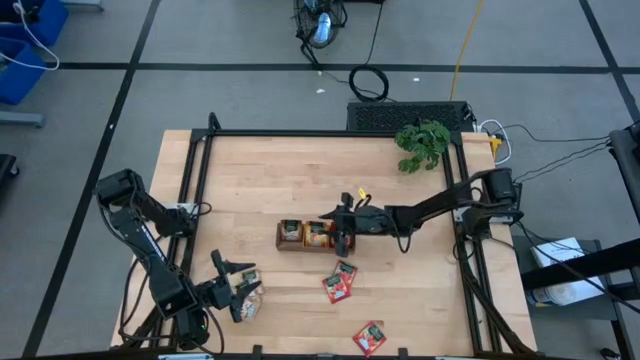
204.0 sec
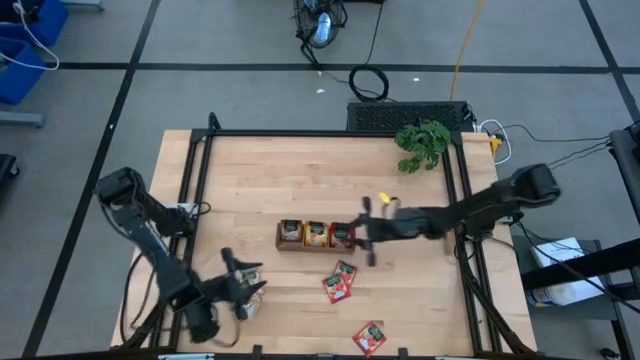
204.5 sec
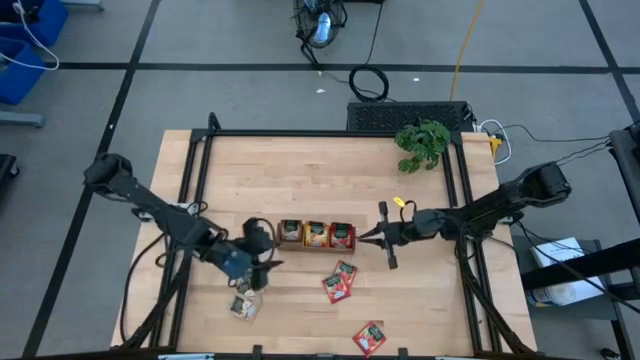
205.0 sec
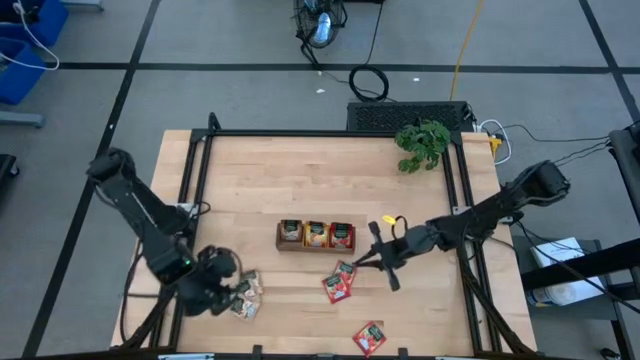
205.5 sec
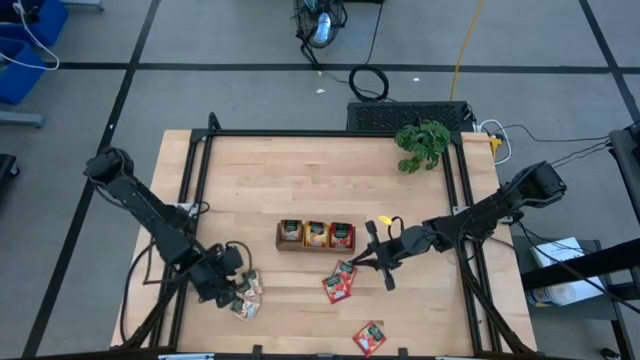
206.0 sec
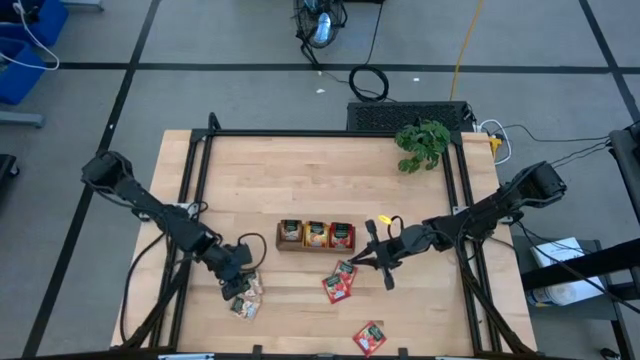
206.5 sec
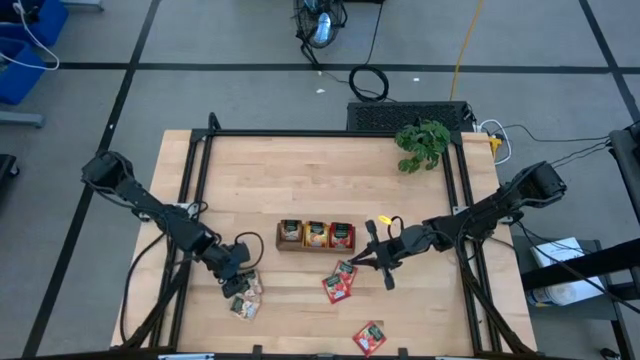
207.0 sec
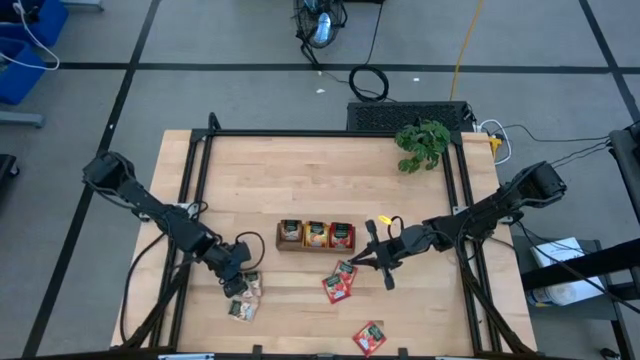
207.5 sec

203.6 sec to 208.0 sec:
Task: Pick & Place Tea
Put the brown tea bag into the left section of the wooden organizer

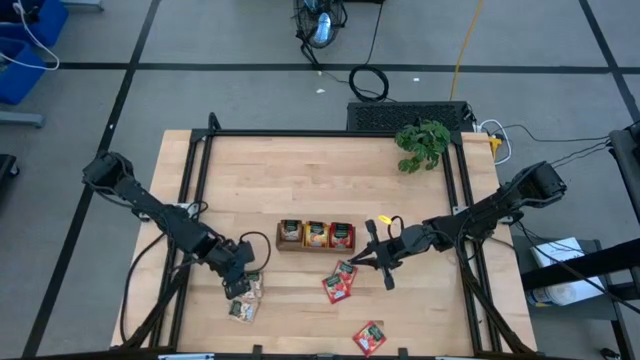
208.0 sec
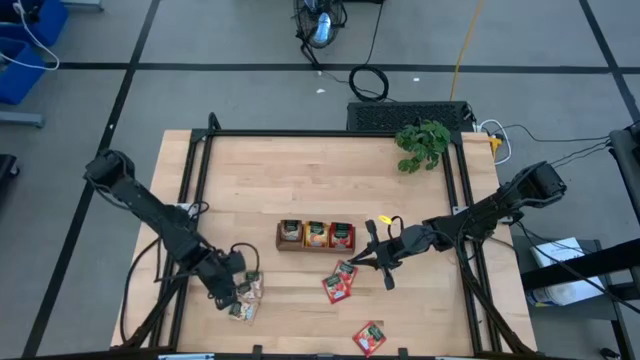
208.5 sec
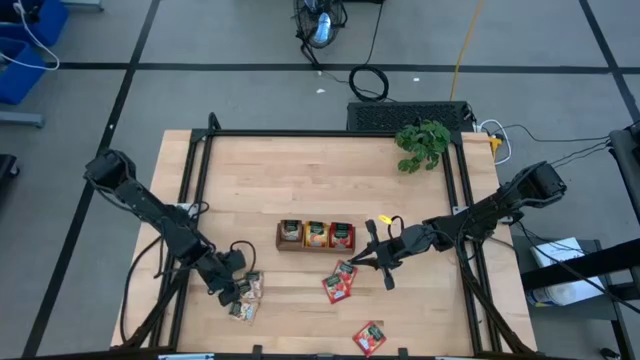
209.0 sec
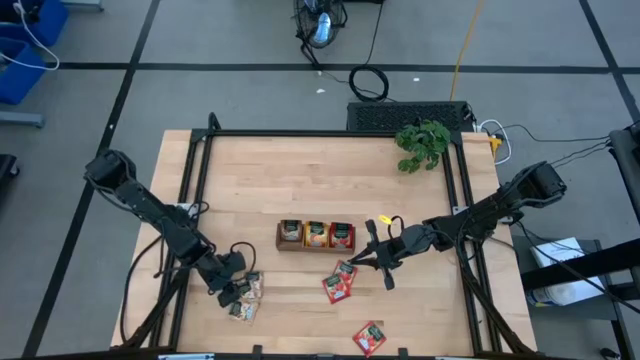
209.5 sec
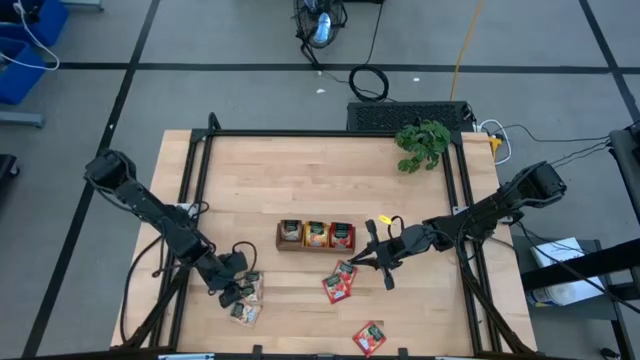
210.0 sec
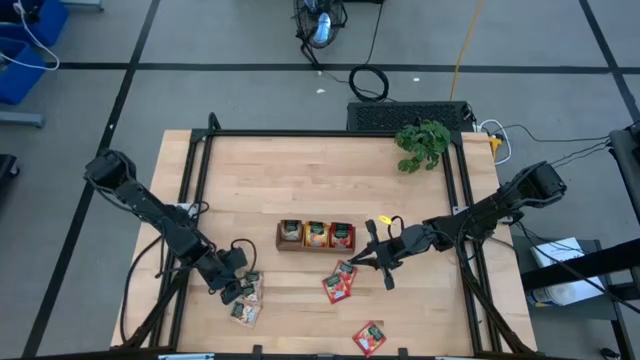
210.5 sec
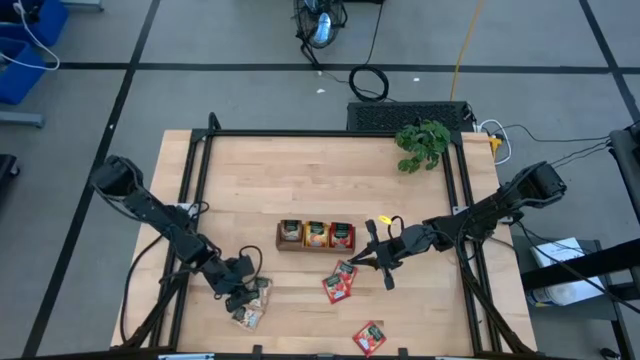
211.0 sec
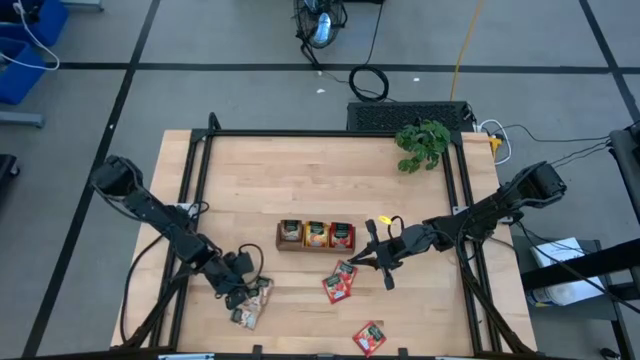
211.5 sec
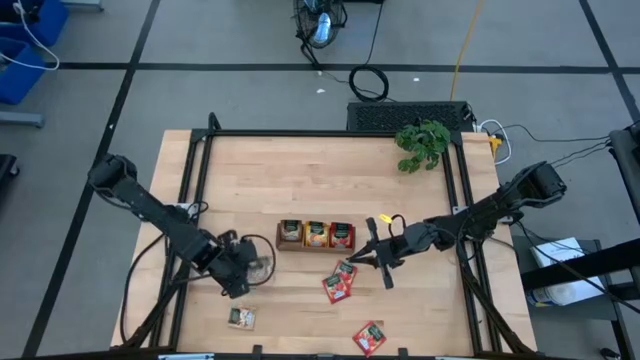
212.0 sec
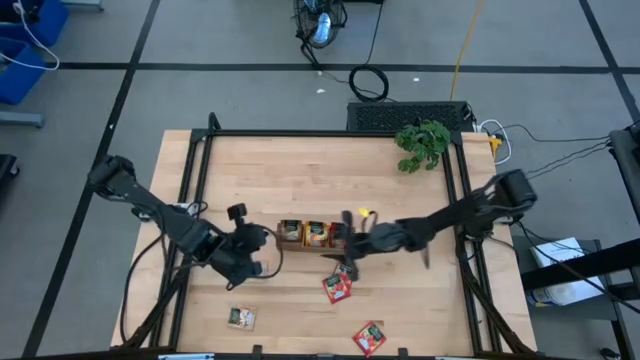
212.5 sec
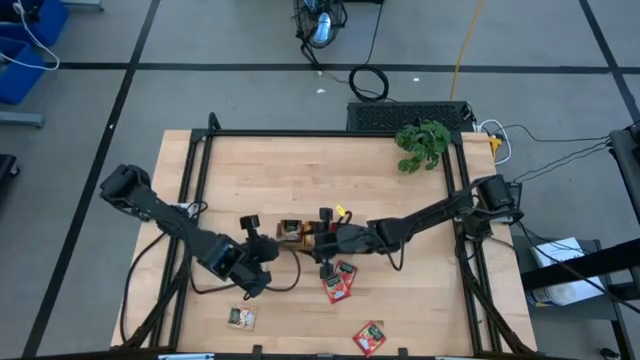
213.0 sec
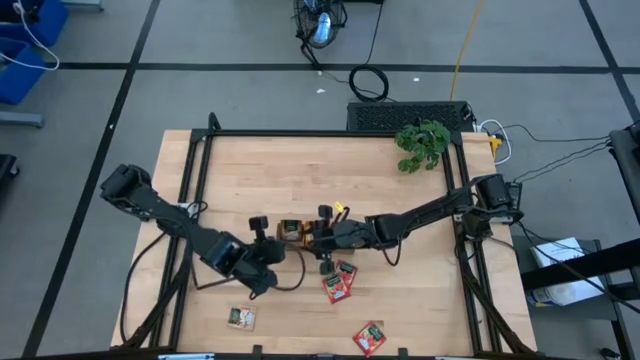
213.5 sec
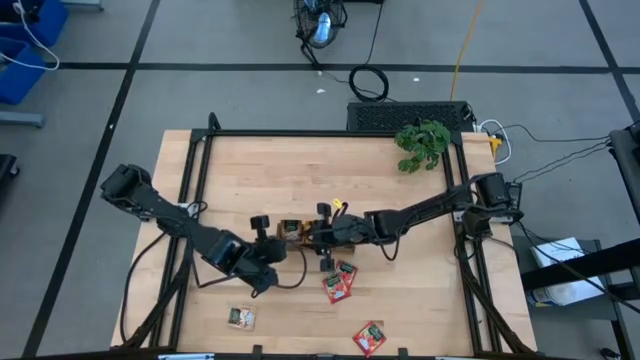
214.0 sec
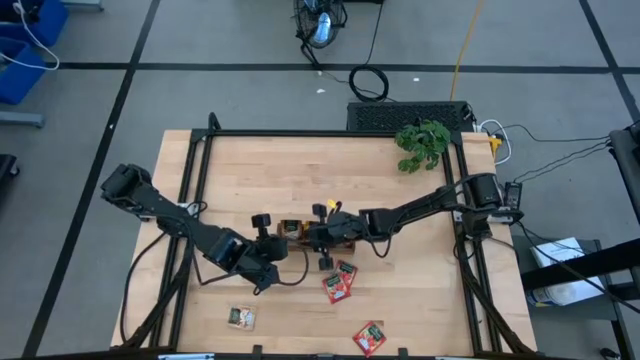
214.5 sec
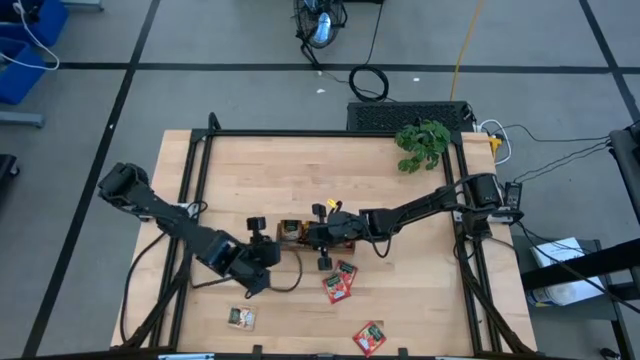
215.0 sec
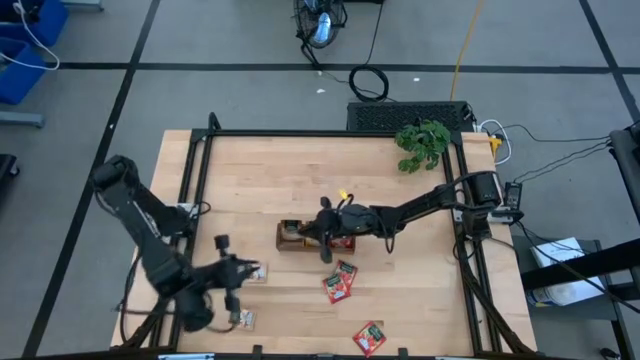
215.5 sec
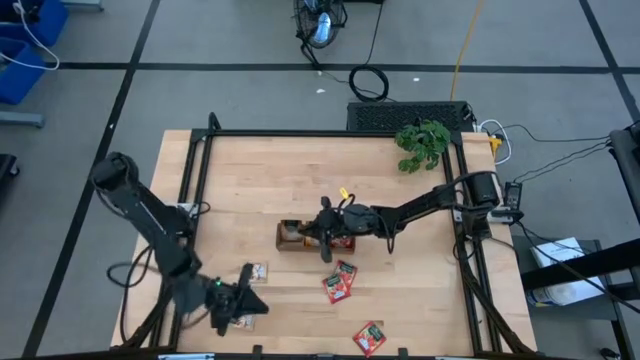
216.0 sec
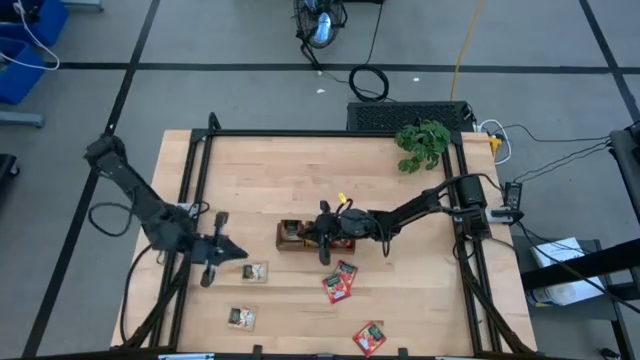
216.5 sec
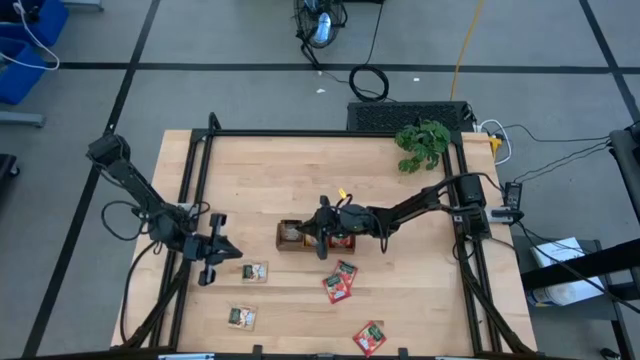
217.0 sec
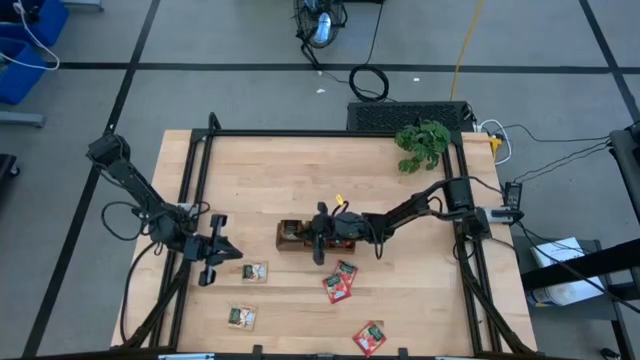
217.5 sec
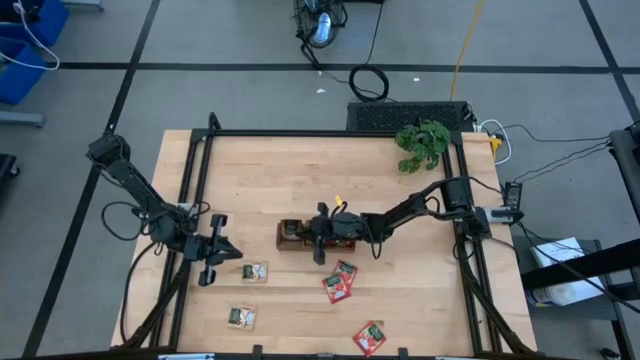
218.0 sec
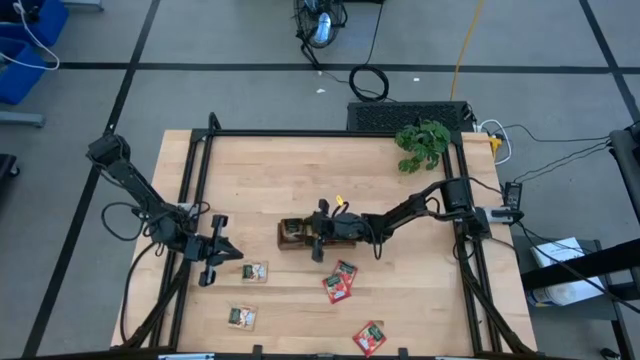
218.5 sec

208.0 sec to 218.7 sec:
Put the brown tea bag into the left section of the wooden organizer

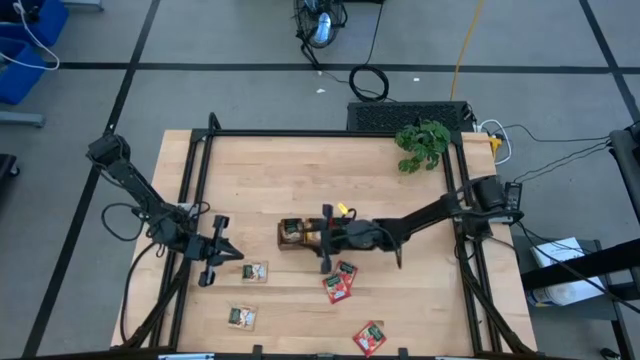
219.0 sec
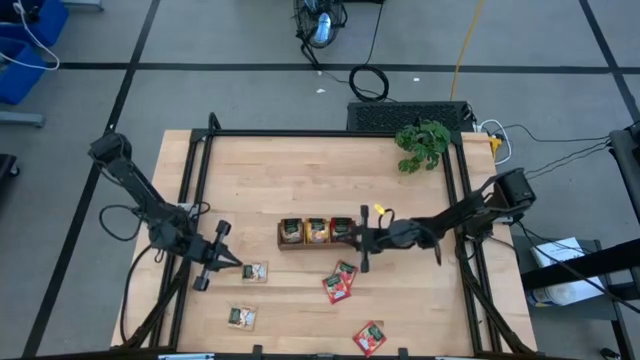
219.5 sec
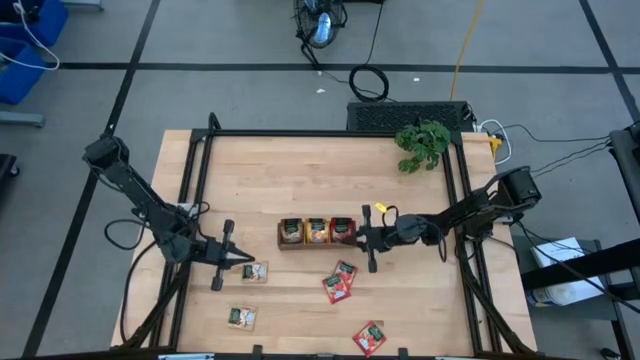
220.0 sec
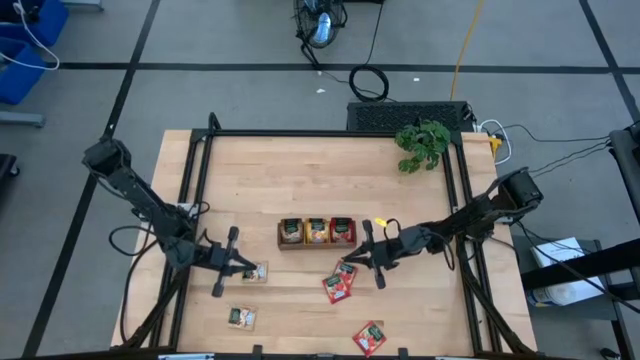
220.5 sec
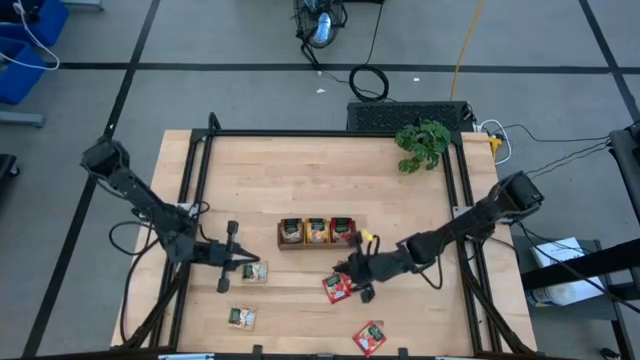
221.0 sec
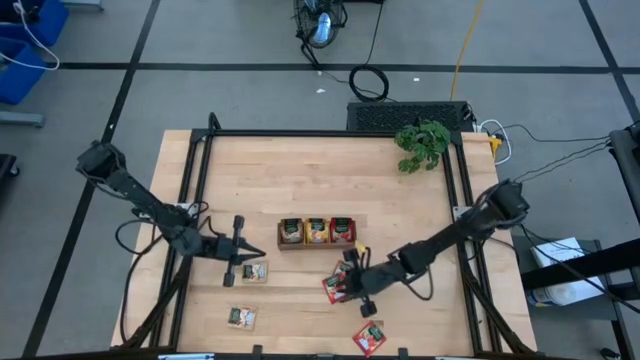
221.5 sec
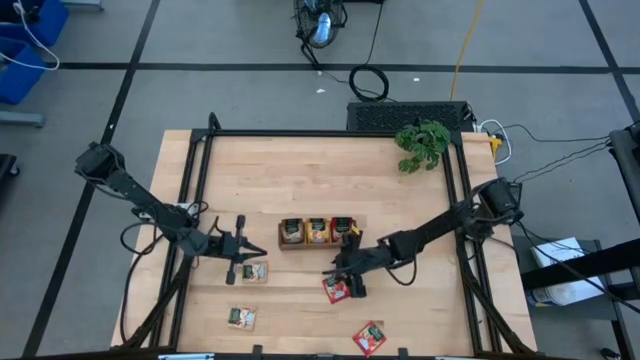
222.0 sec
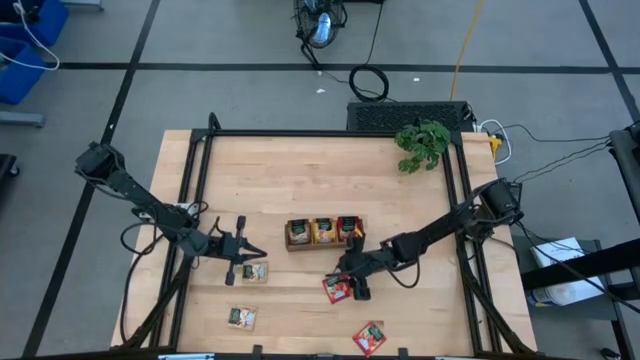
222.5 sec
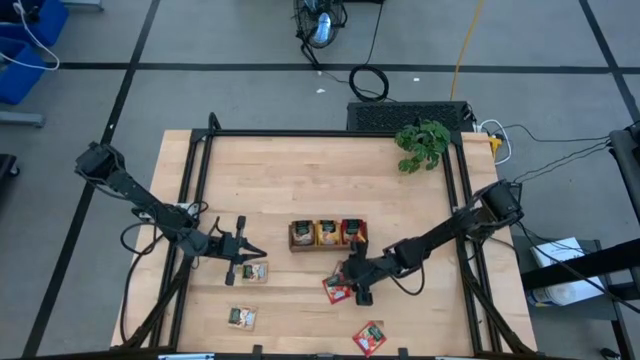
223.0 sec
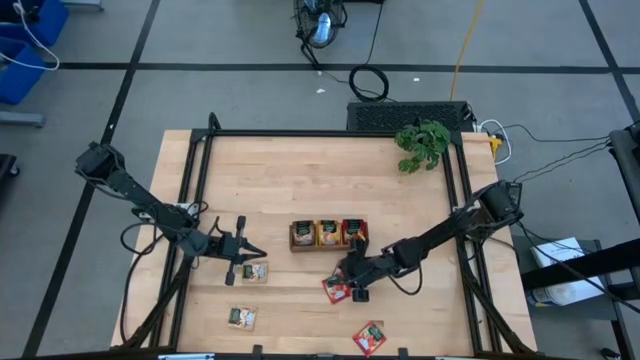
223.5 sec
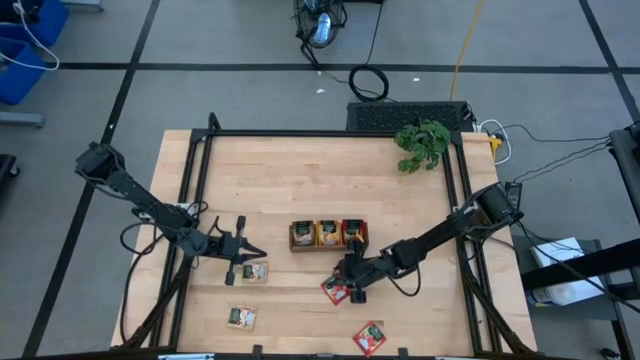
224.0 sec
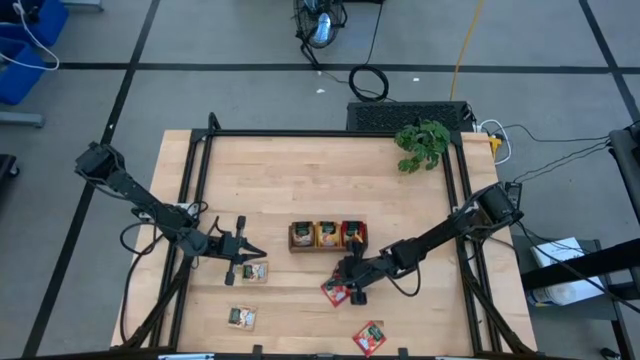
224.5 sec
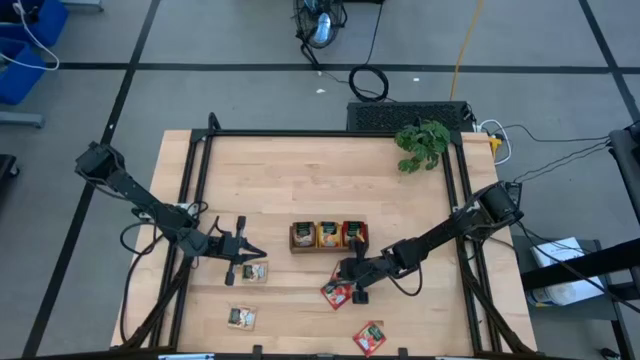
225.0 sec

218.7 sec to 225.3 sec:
Put the red tea bag into the right section of the wooden organizer

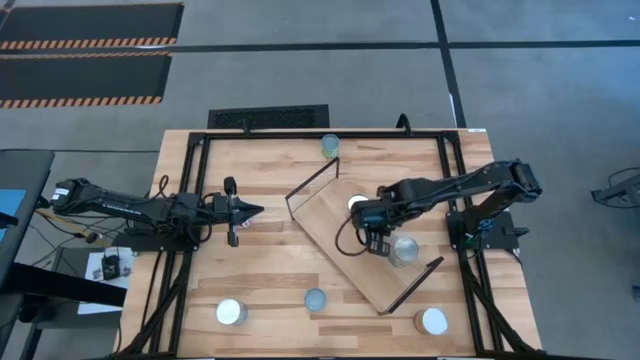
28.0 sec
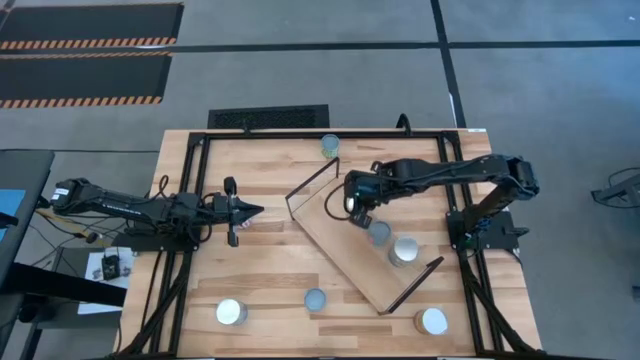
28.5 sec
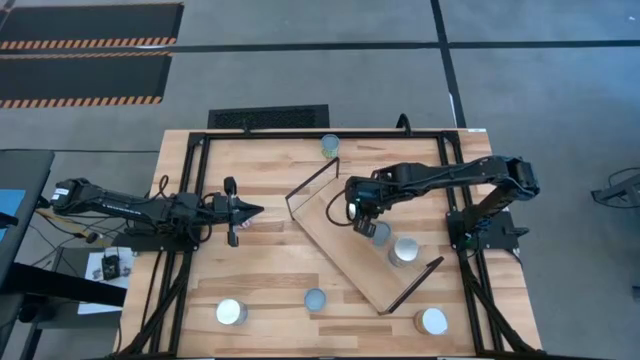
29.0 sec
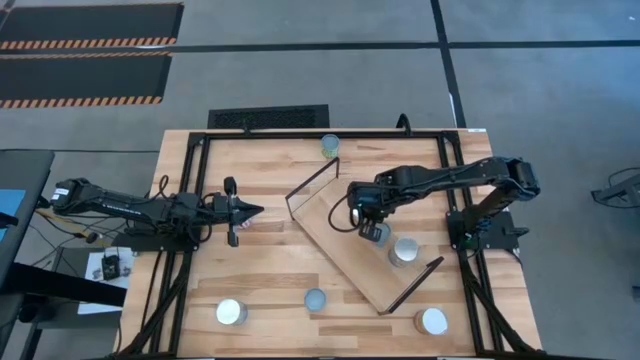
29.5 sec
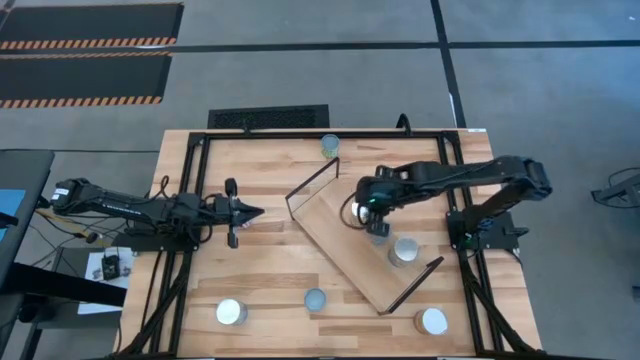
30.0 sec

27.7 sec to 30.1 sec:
Task: Pick and place cans onto a shelf
Adjust the large canned corn on the shelf
